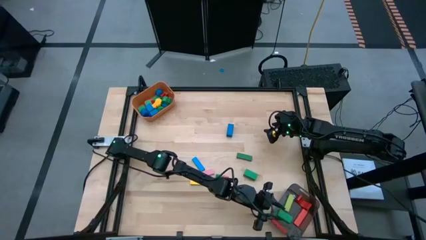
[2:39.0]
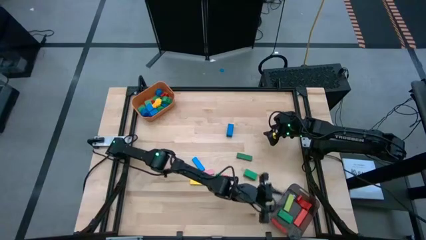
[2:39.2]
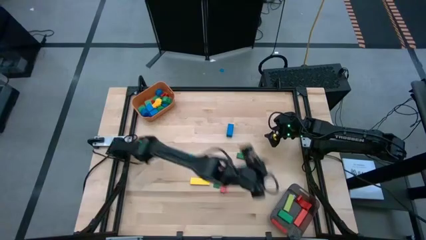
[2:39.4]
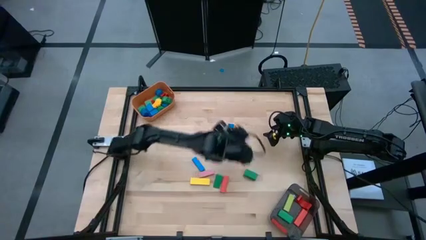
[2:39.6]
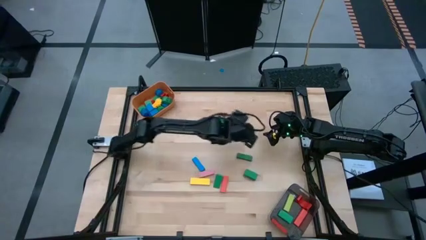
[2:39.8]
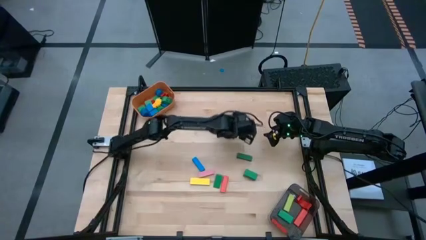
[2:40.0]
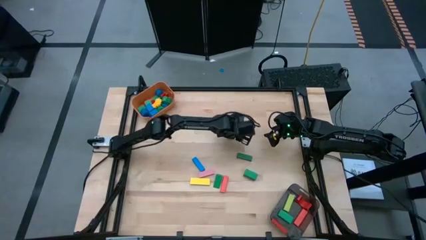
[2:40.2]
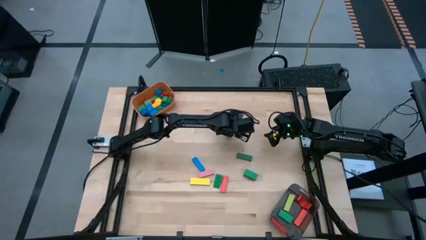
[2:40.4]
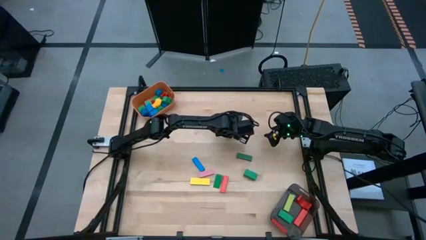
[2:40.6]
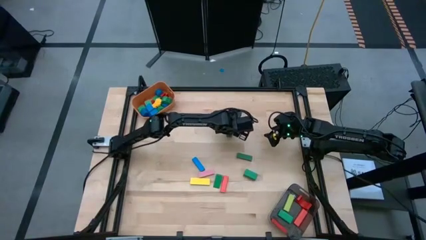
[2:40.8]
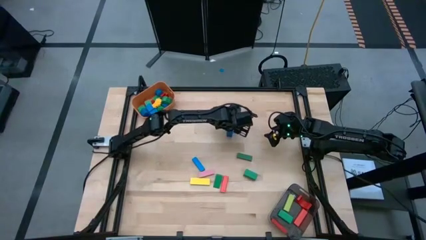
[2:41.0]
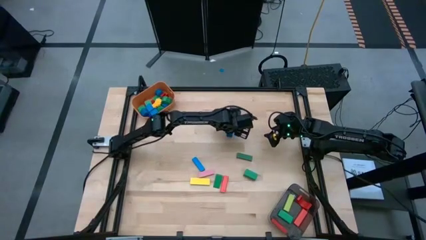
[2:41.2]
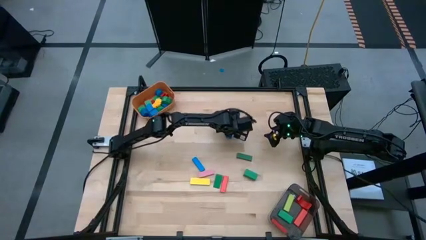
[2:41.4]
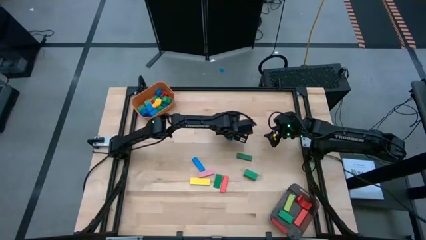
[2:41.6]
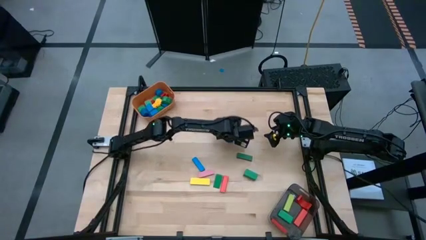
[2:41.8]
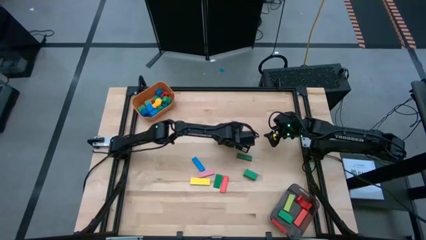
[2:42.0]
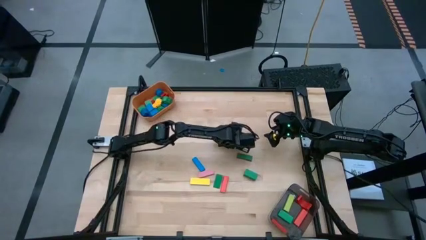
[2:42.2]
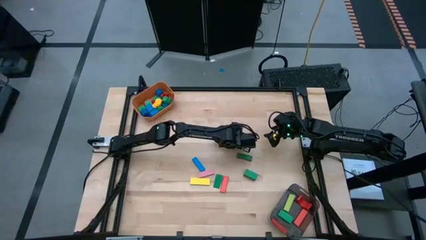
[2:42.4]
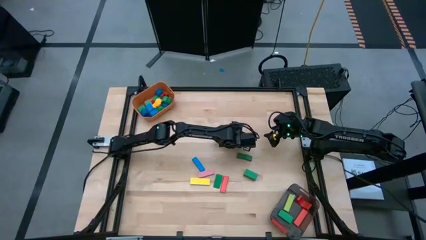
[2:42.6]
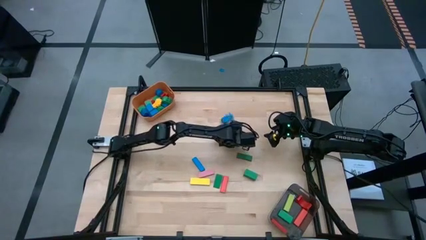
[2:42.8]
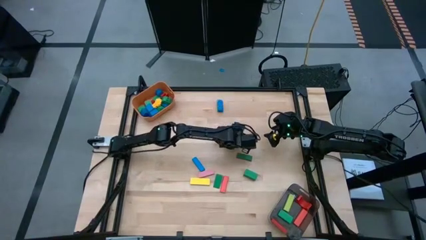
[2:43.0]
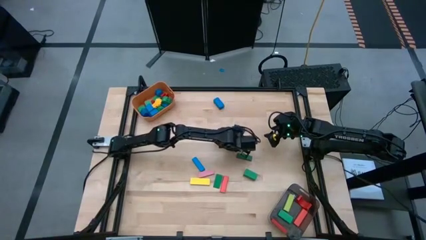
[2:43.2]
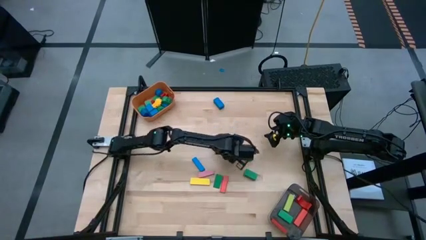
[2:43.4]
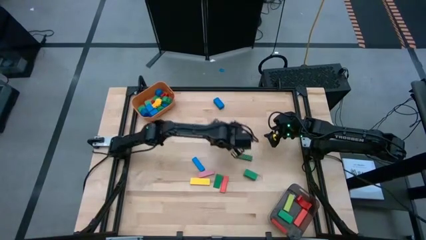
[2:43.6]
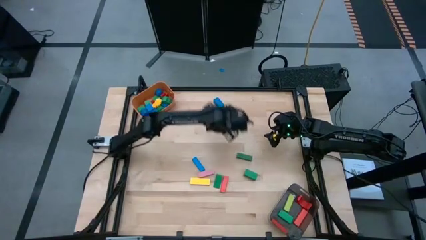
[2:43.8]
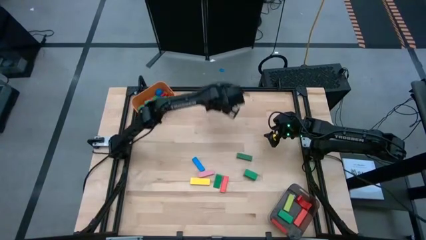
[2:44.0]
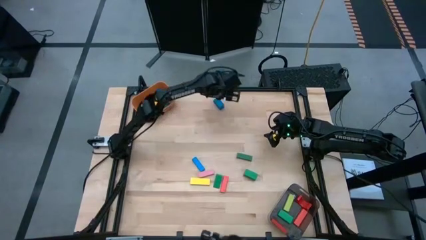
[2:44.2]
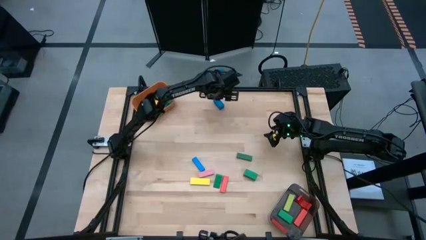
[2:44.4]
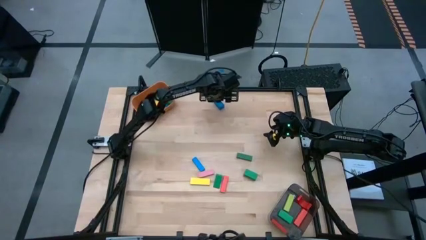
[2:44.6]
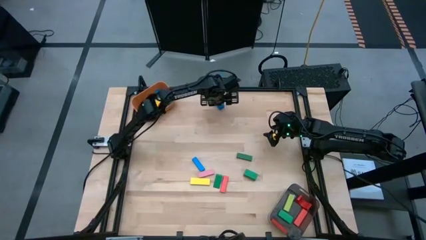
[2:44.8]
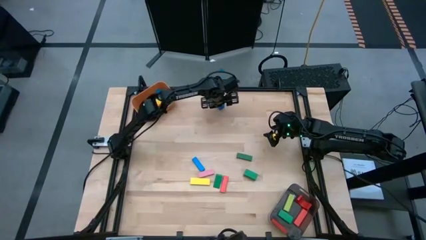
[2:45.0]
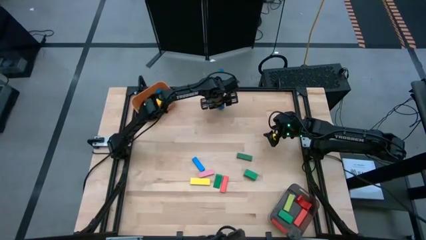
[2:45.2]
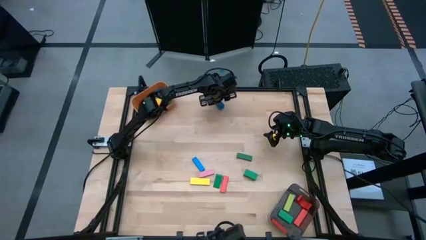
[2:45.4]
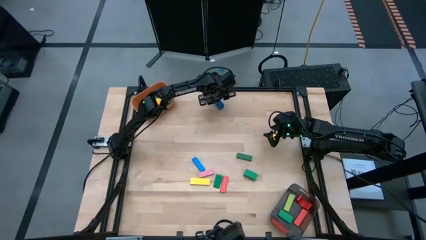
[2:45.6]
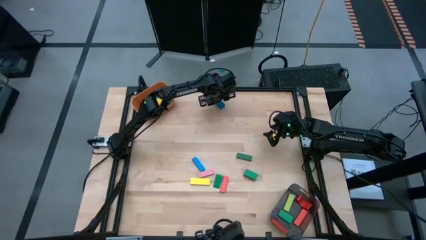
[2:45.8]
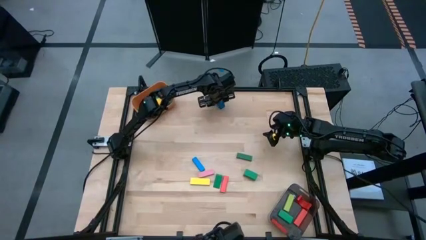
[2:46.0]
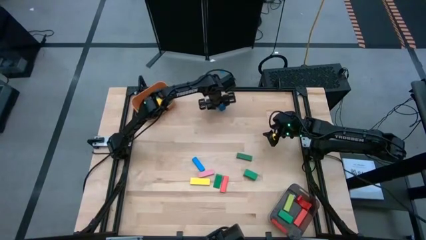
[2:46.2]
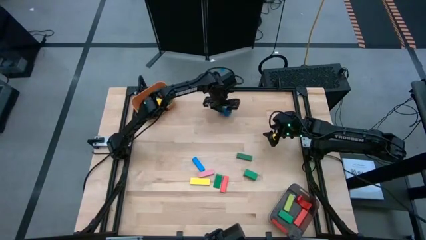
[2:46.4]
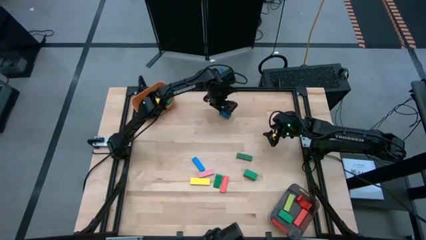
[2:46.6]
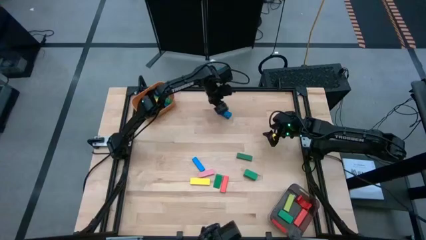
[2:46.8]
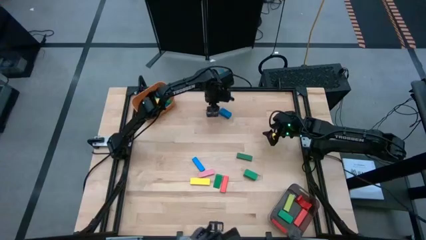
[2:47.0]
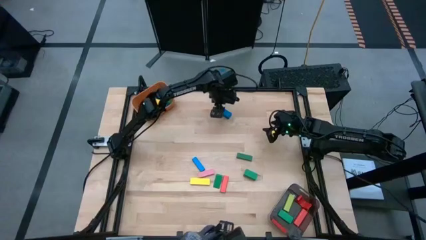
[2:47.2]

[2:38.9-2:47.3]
Task: Sort blocks by size
Put the big blue block into the black bin

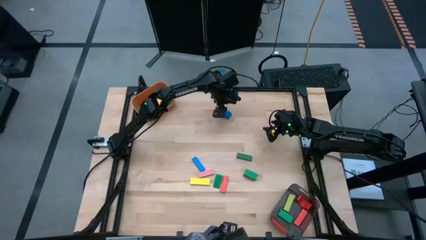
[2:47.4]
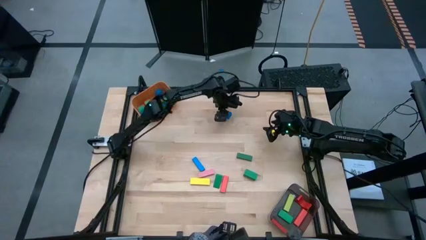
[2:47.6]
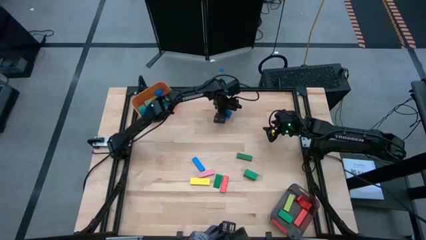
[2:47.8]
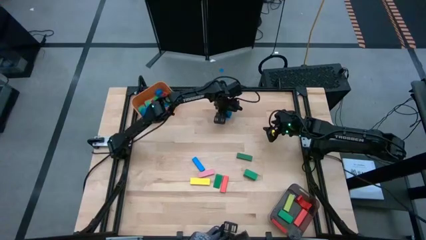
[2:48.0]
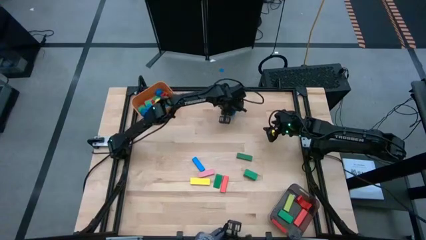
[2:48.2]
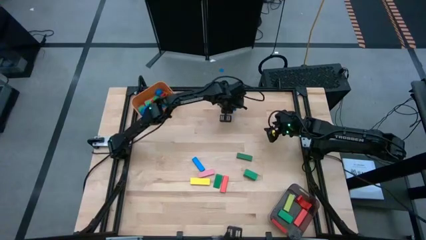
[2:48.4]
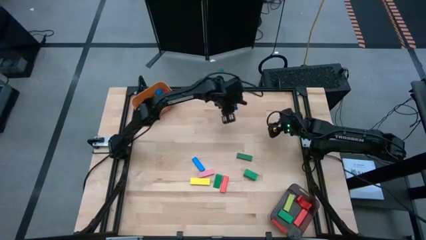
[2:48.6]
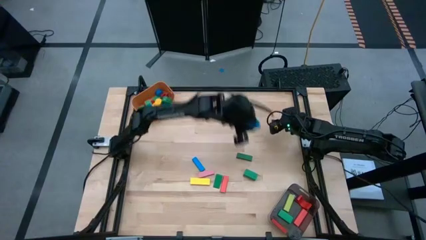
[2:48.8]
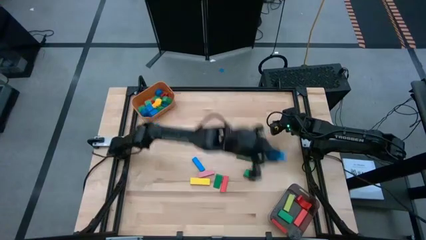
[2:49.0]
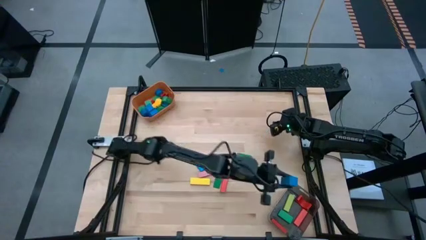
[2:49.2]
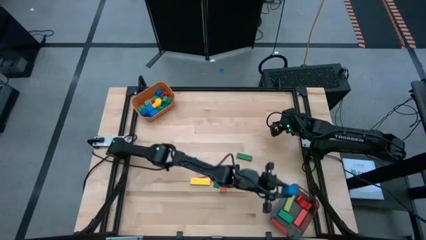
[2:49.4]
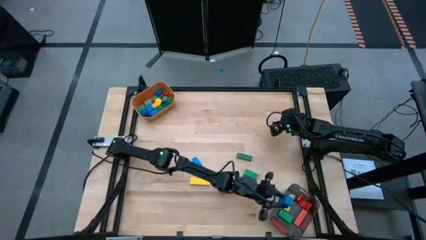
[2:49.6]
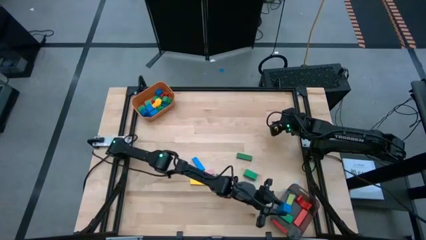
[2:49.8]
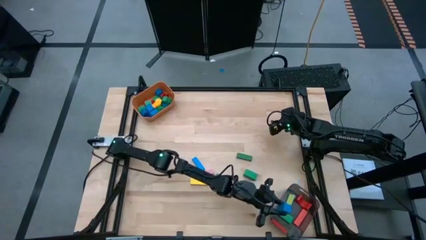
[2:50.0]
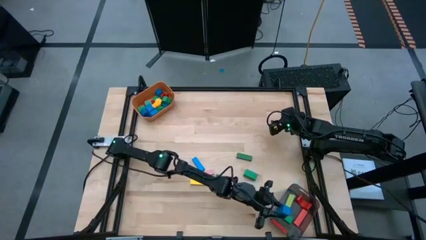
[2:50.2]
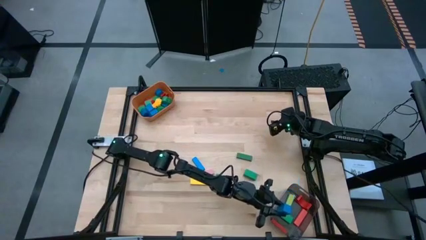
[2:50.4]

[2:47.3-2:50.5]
Put the big green block into the black bin

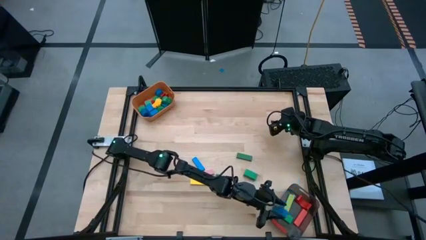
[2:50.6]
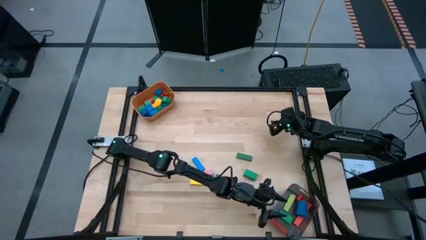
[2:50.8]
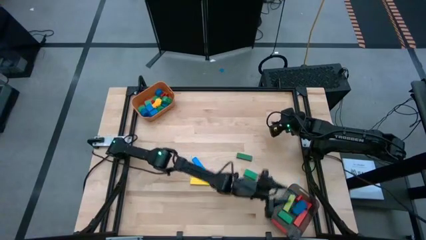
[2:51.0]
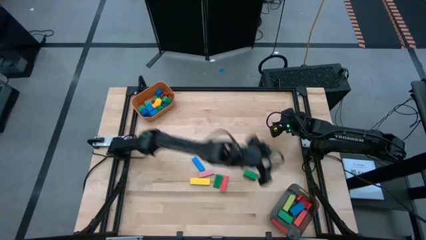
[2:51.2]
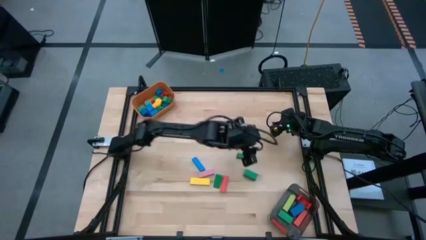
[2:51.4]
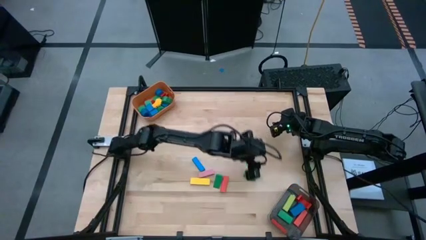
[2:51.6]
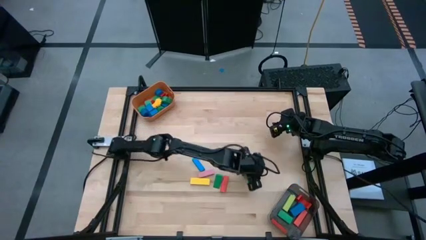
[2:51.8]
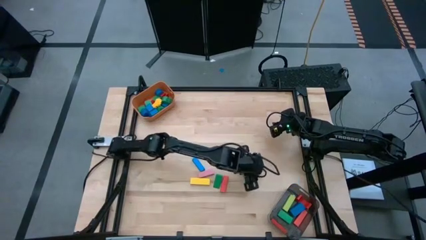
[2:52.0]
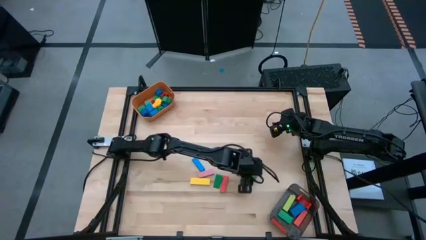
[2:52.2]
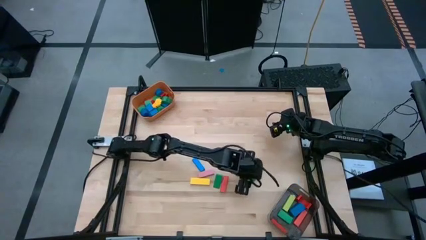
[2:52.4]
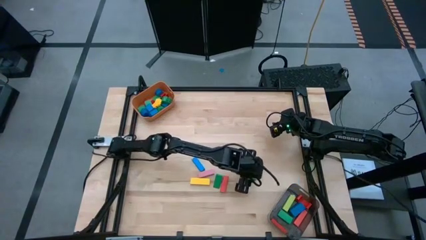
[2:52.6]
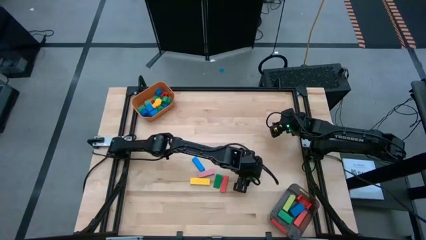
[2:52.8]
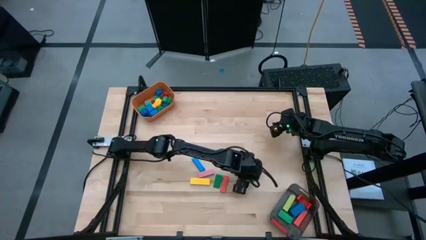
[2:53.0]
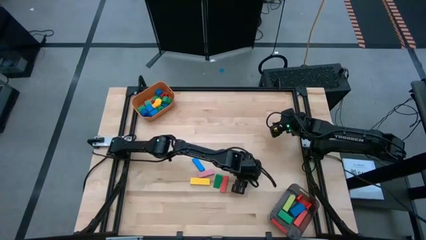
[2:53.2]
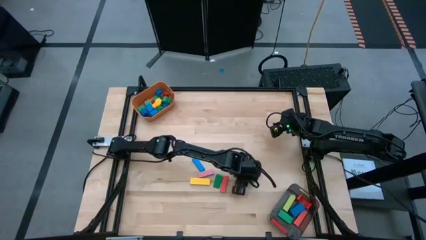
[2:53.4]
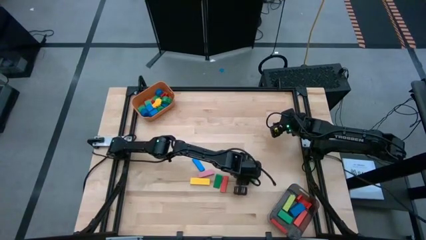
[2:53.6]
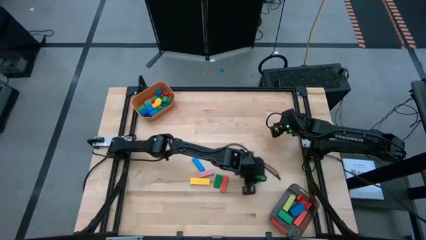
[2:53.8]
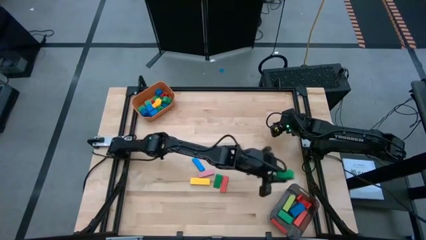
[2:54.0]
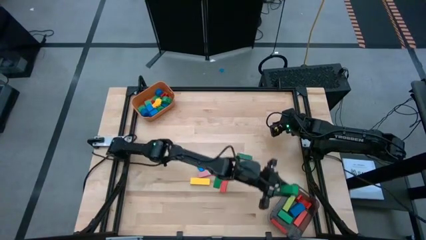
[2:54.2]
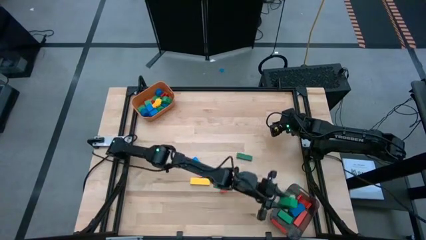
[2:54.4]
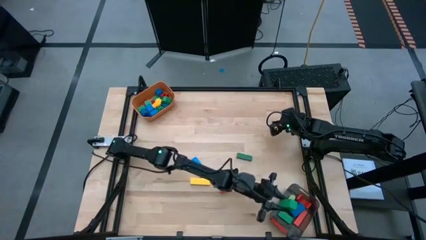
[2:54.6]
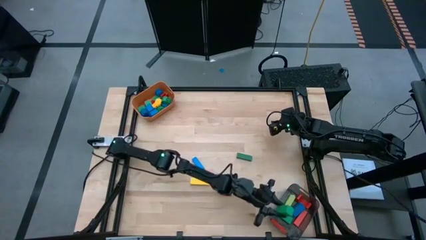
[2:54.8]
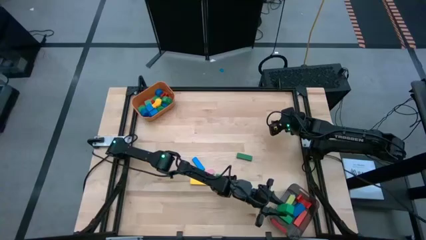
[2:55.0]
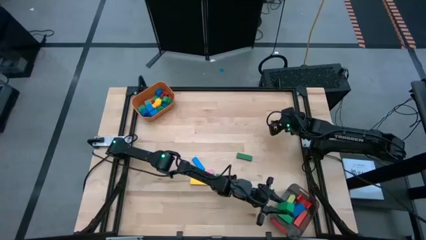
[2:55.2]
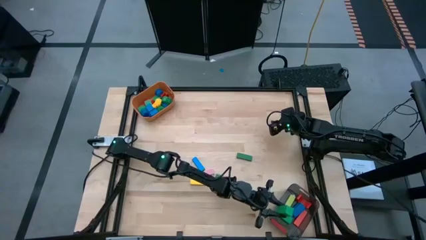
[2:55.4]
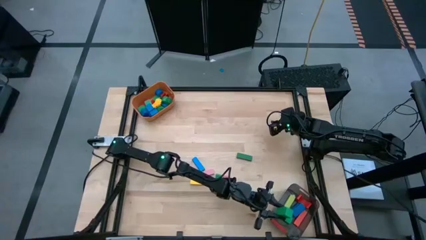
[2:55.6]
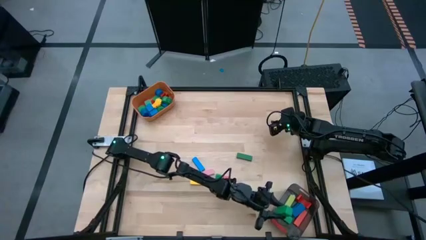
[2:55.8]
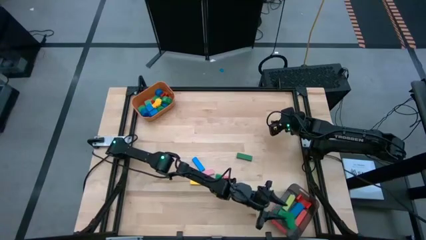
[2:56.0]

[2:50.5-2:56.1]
Put the big blue block into the black bin
